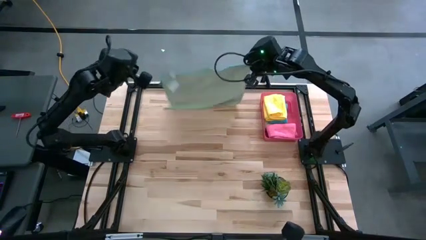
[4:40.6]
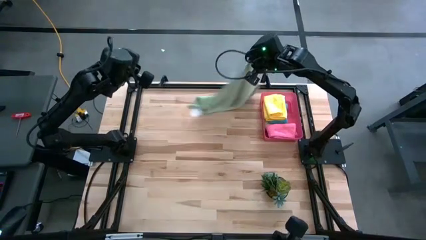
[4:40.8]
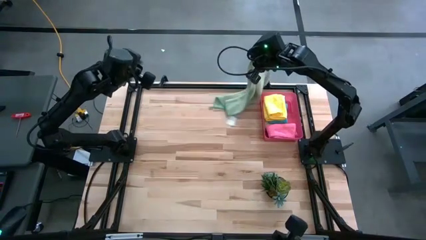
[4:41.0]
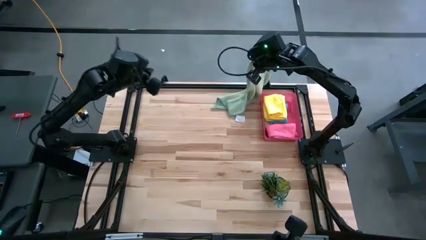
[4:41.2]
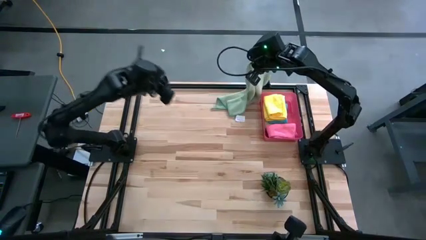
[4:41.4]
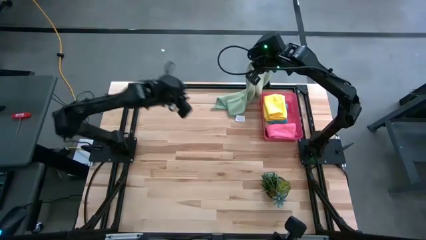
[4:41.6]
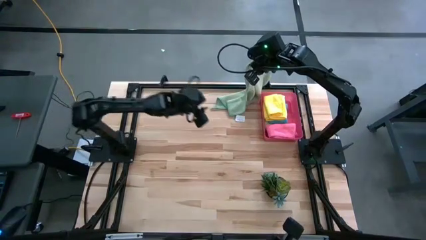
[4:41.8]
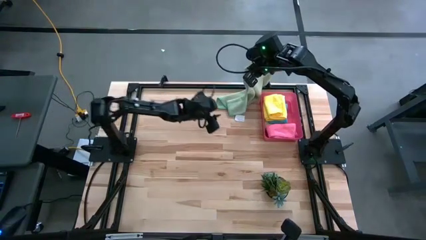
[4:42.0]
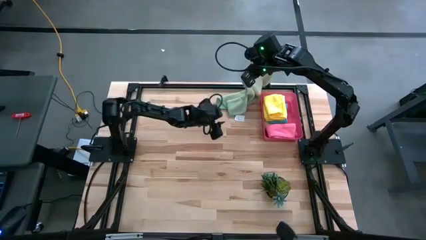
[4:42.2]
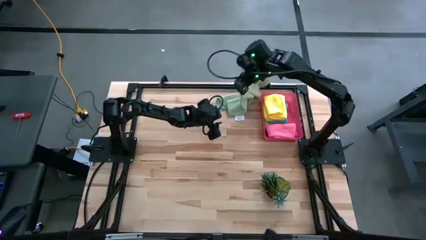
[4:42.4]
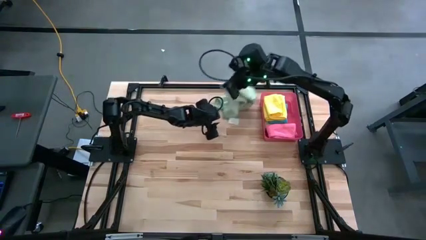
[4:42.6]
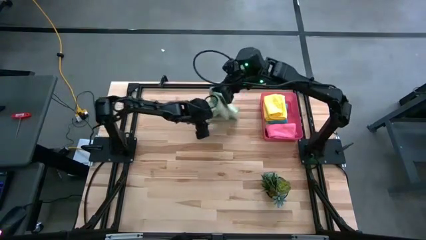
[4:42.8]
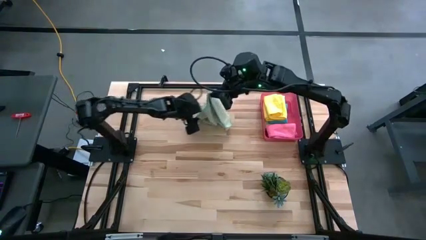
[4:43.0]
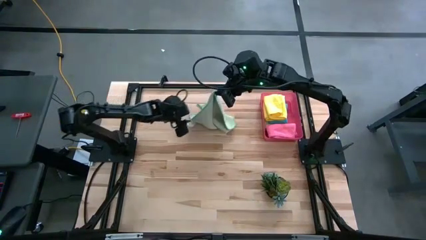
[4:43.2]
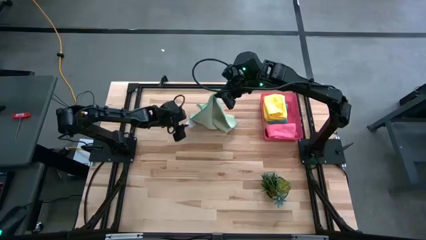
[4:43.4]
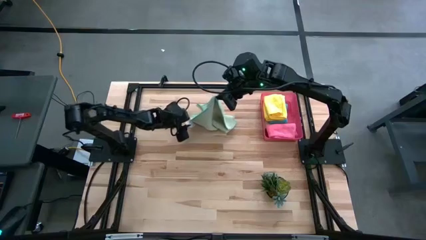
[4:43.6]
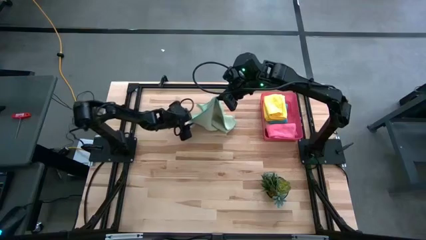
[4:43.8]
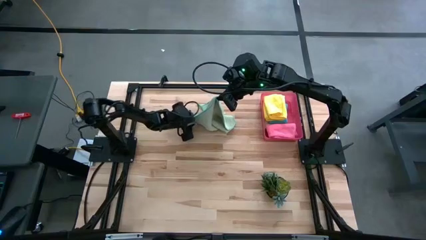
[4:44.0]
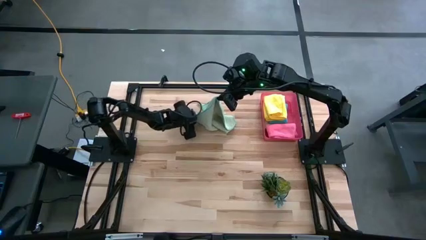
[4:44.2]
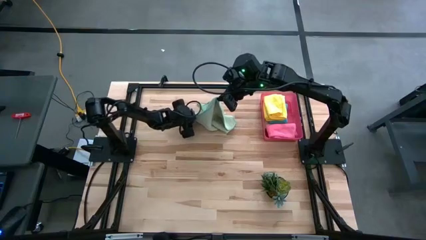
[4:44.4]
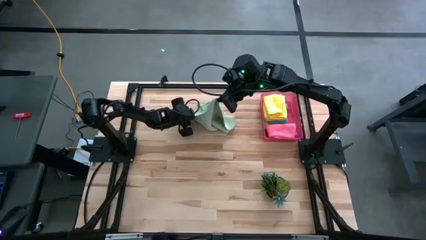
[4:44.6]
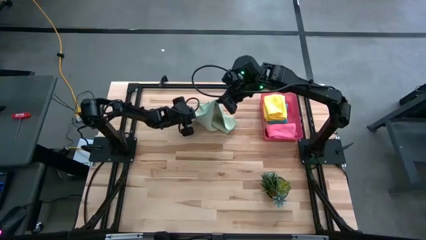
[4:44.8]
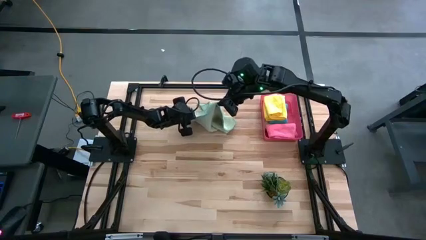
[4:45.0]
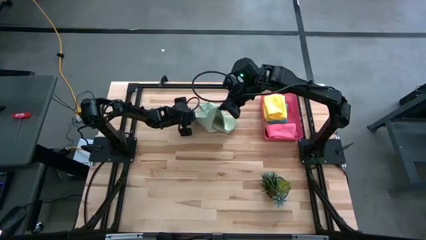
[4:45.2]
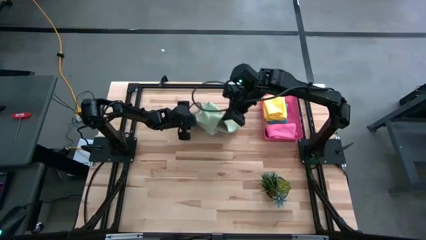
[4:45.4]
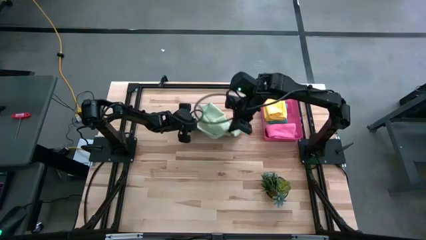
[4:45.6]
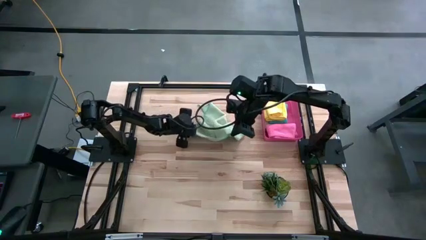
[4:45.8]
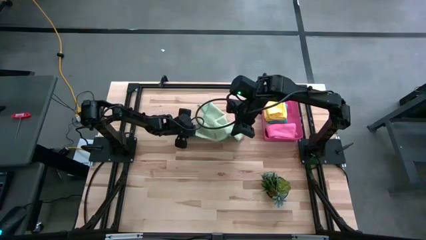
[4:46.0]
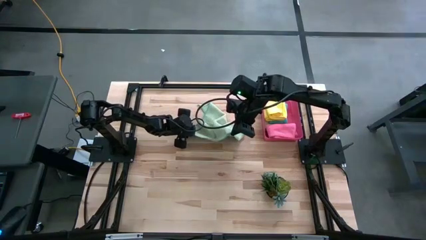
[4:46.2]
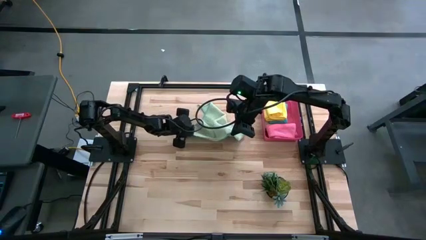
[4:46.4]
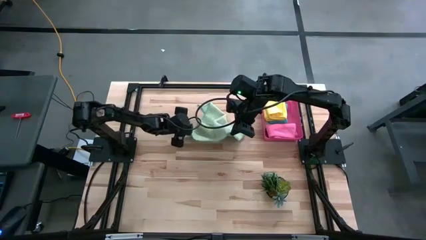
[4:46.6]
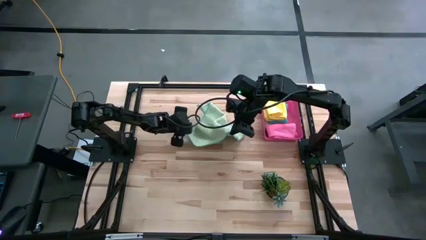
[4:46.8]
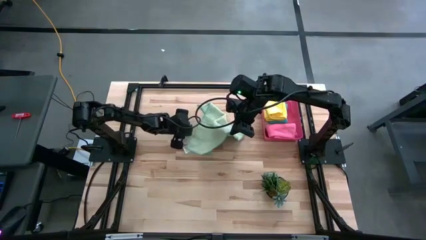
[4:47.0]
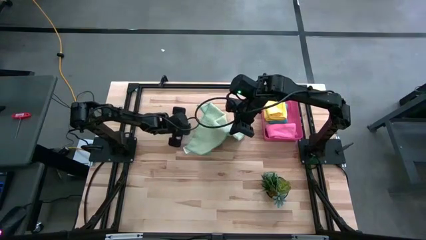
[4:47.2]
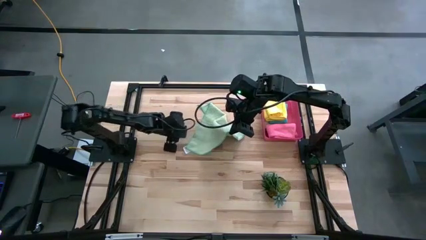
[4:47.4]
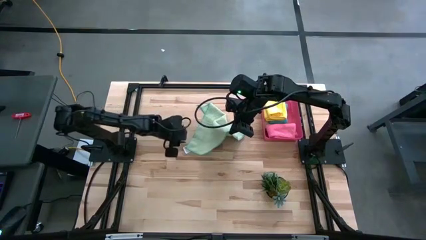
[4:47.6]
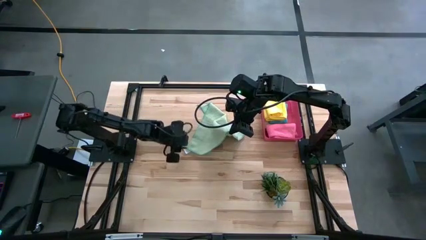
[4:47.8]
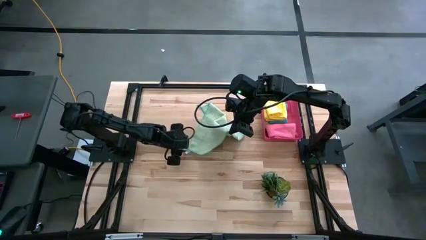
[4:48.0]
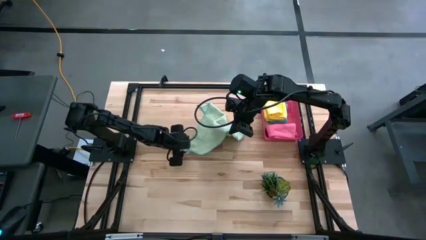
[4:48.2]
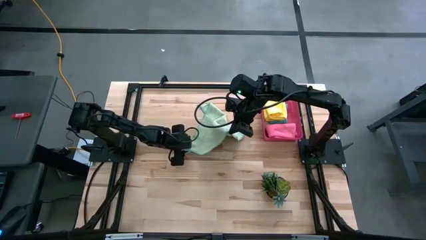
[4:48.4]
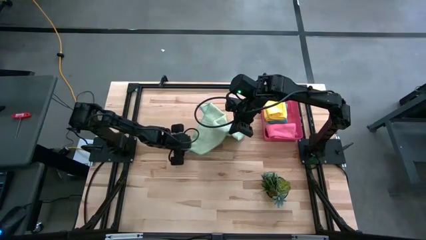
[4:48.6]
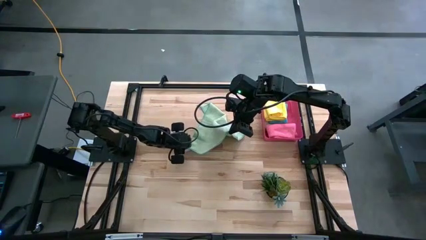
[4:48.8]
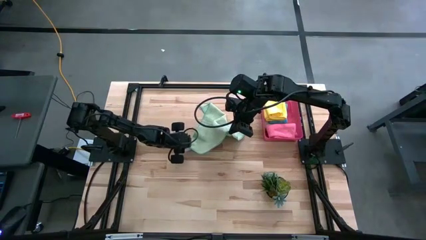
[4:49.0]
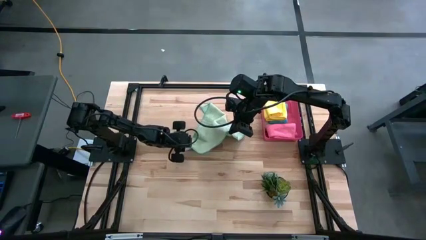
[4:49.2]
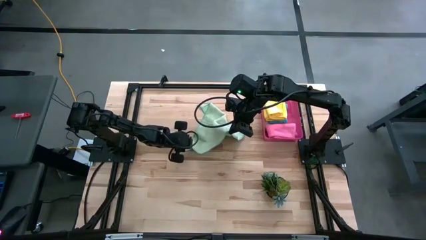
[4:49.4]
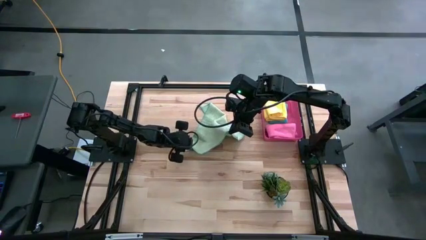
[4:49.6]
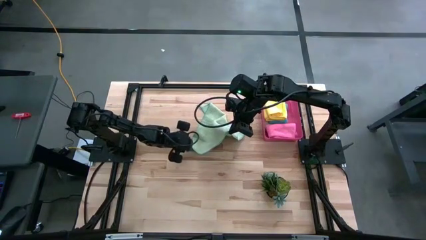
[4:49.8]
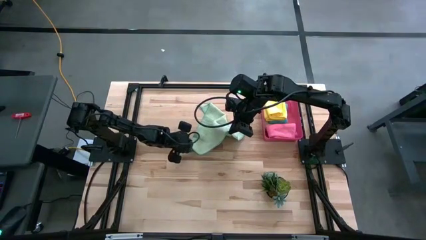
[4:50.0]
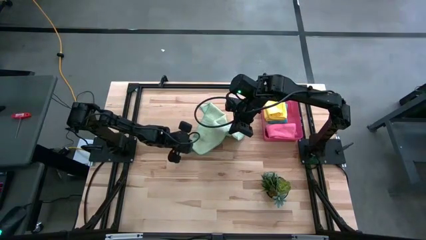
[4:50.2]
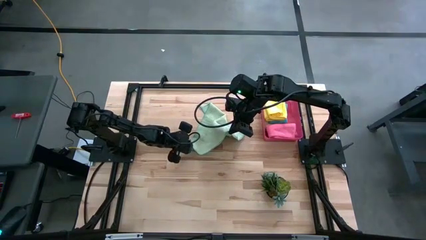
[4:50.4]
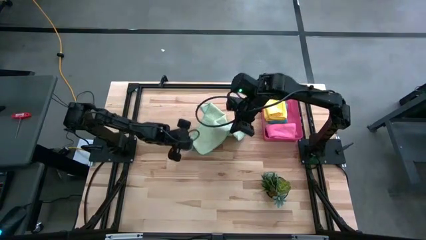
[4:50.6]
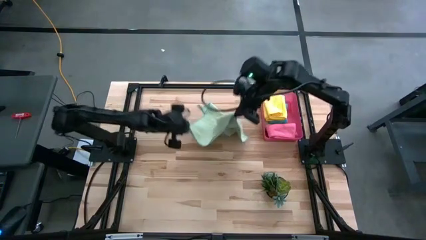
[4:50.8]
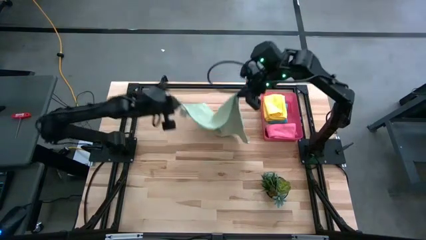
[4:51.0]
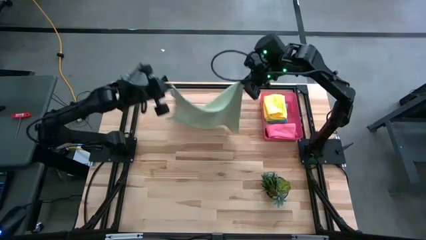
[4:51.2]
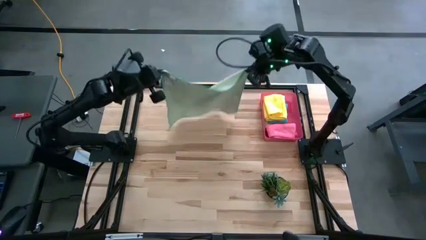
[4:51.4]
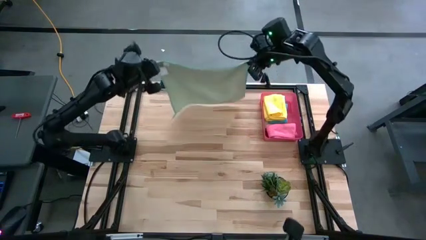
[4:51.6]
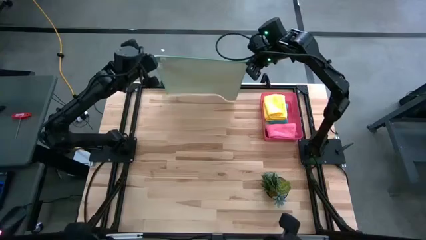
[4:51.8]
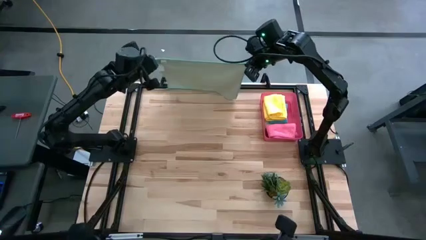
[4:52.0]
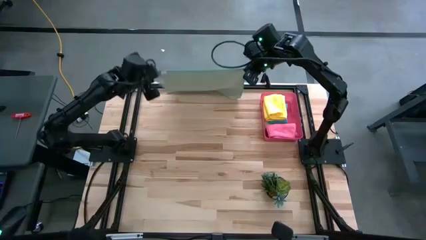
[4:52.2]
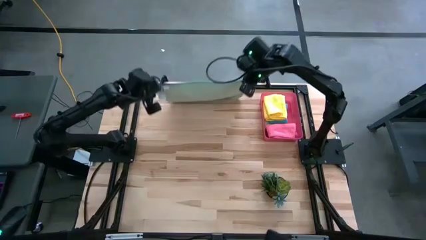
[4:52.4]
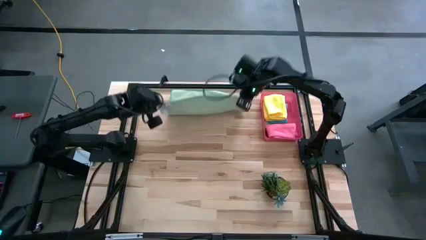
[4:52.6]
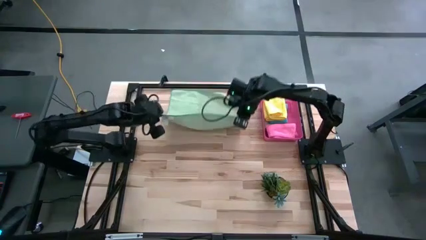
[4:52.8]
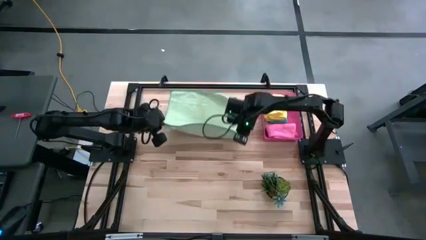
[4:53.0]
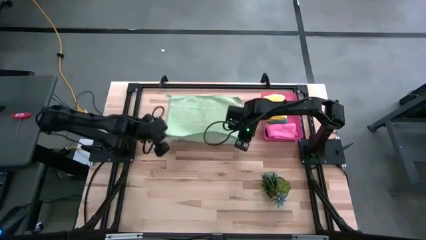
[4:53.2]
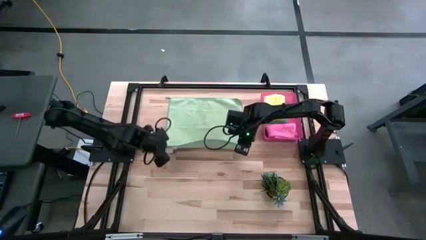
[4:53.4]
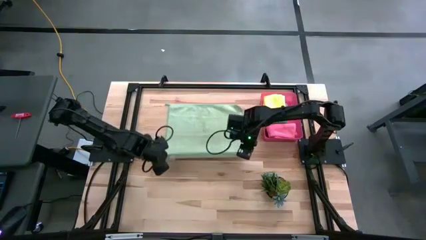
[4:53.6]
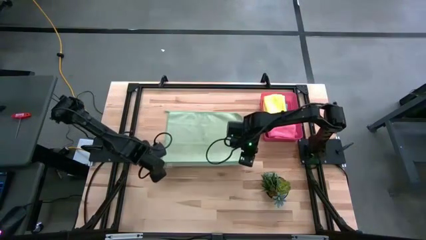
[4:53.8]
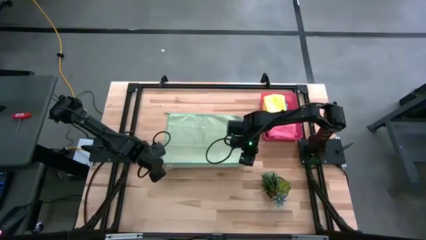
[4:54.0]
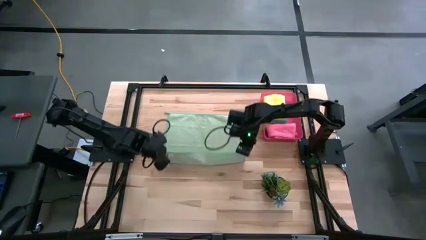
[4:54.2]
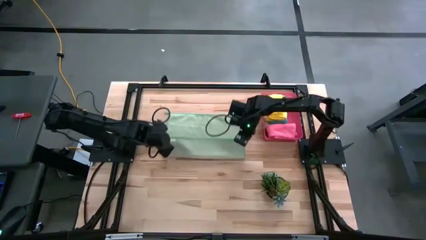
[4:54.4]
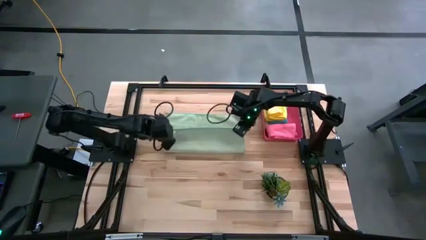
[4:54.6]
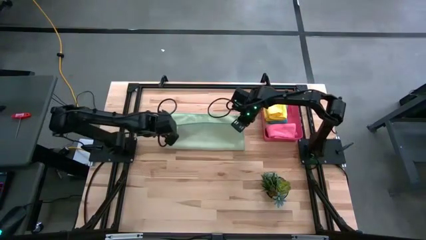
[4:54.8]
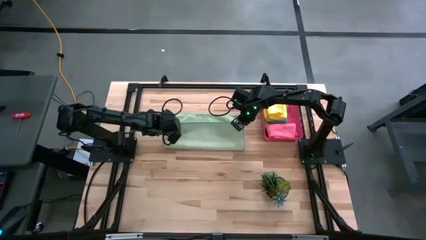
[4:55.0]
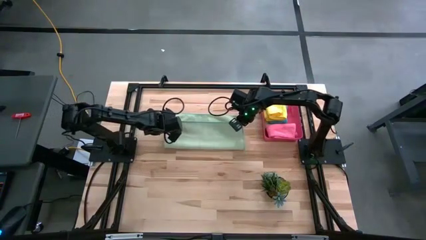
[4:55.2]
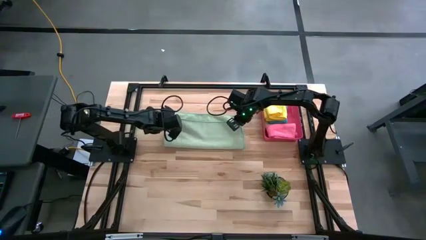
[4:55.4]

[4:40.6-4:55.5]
Task: Fold microfiber towels
Fold the light green microfiber cloth

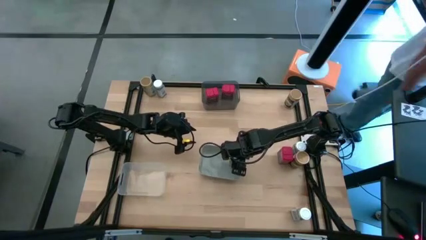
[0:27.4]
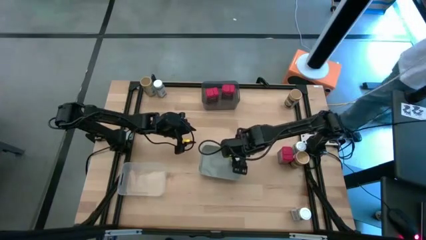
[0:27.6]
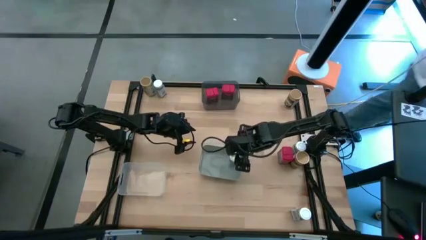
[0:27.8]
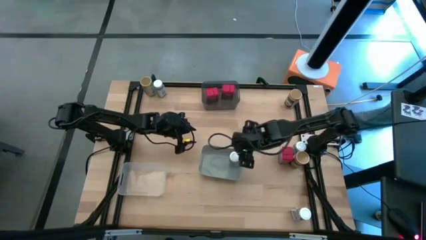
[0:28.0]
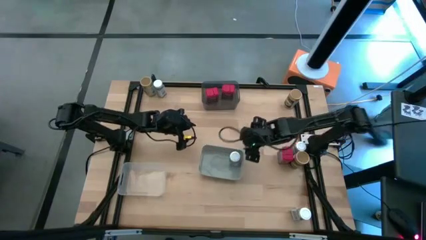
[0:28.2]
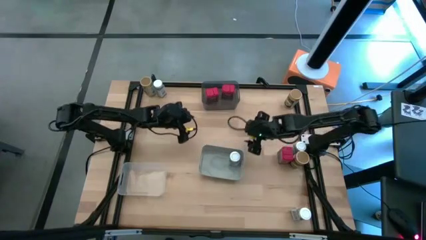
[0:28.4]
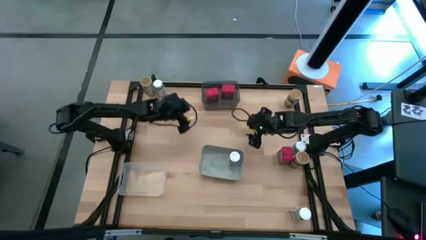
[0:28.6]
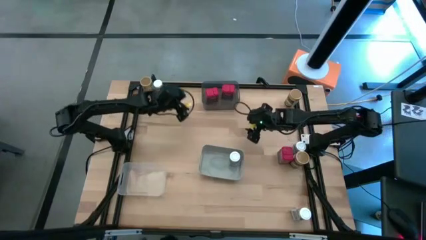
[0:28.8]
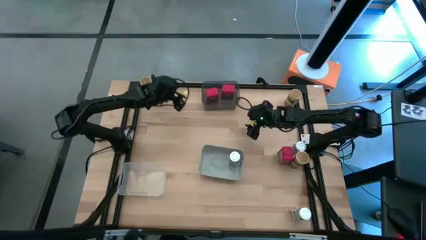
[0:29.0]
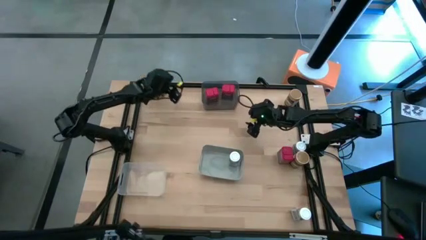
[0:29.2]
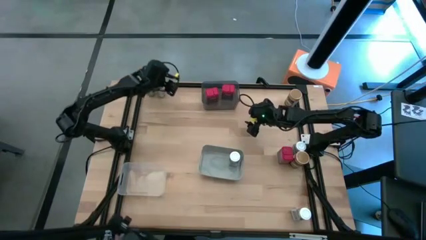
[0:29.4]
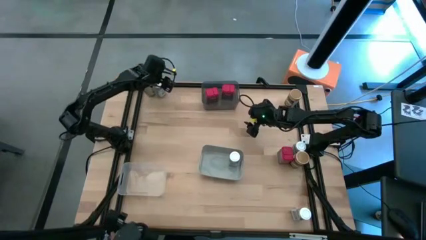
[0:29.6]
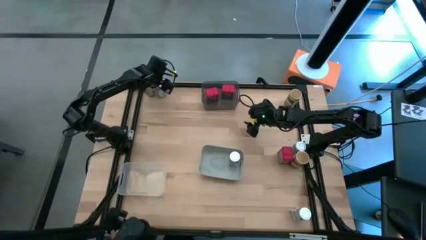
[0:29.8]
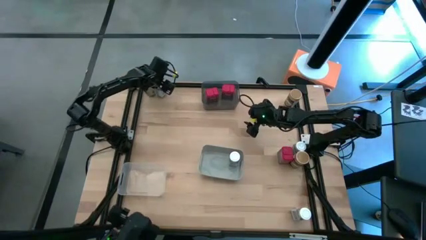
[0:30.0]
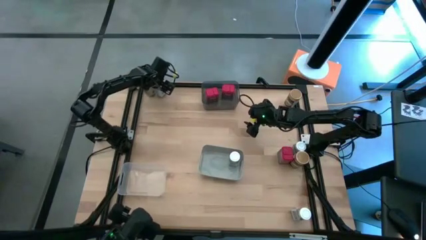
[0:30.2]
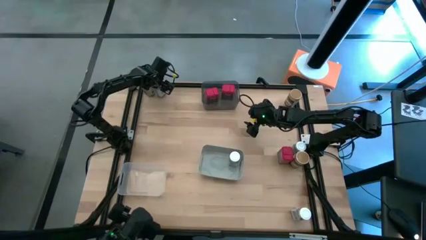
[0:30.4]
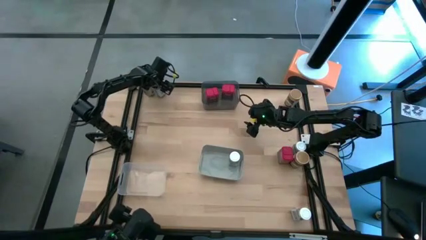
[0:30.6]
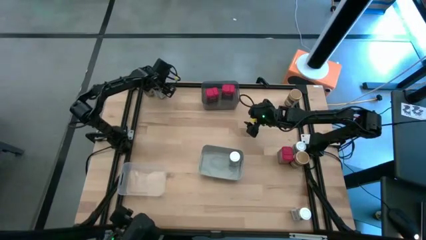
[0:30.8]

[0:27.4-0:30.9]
Task: Sort spices by type
Put the left white seasoning bottle into the gray bin
